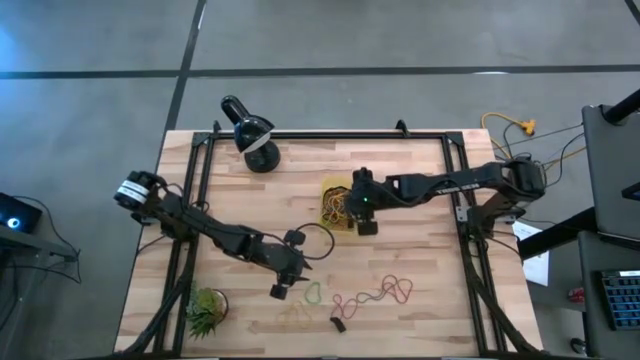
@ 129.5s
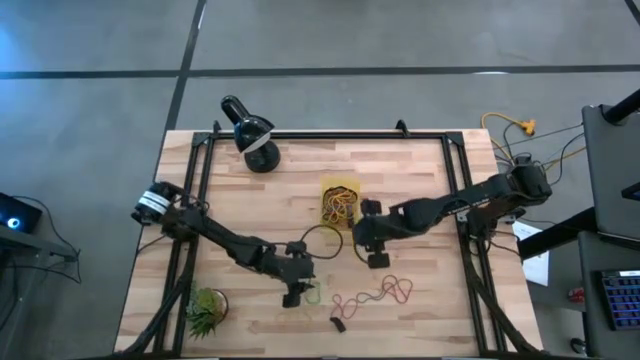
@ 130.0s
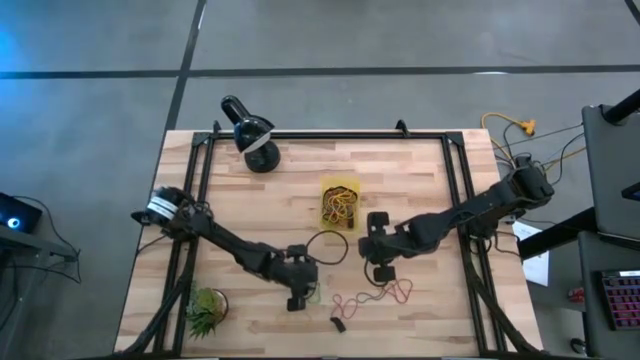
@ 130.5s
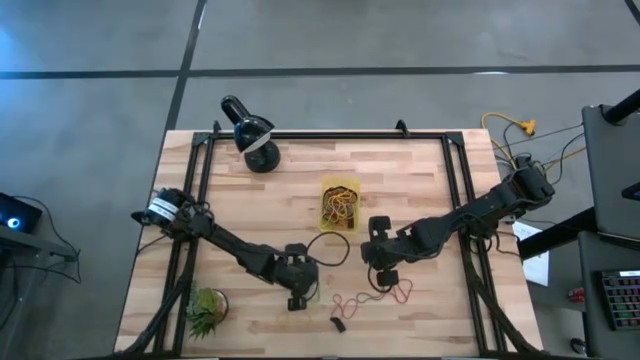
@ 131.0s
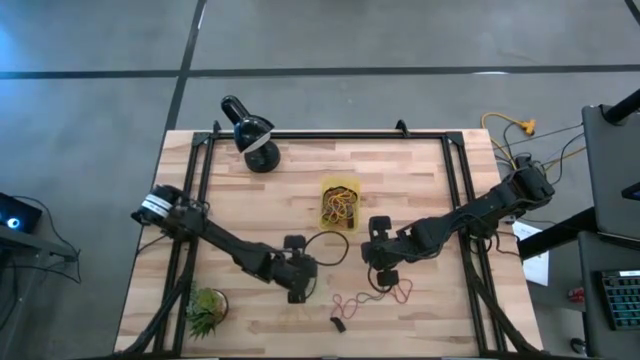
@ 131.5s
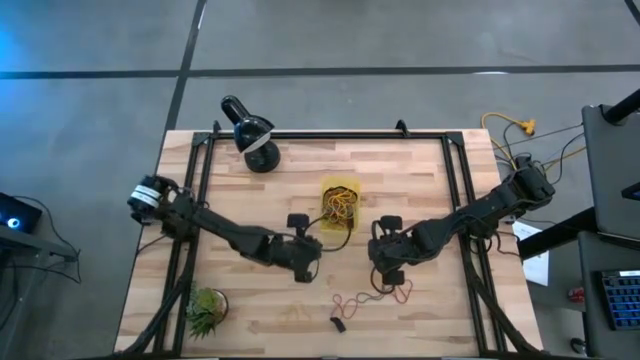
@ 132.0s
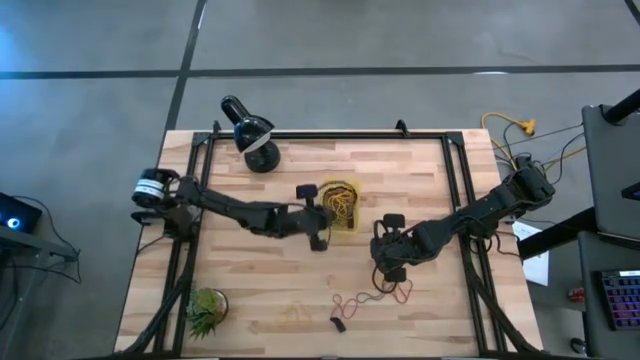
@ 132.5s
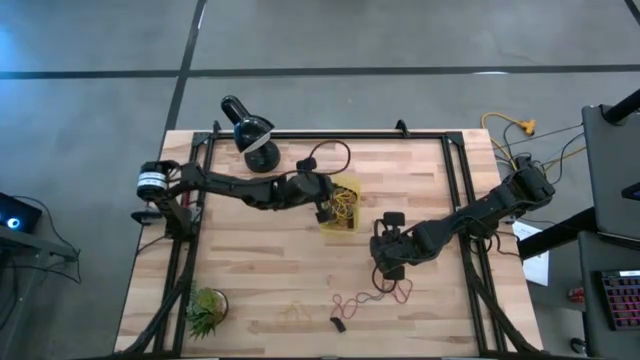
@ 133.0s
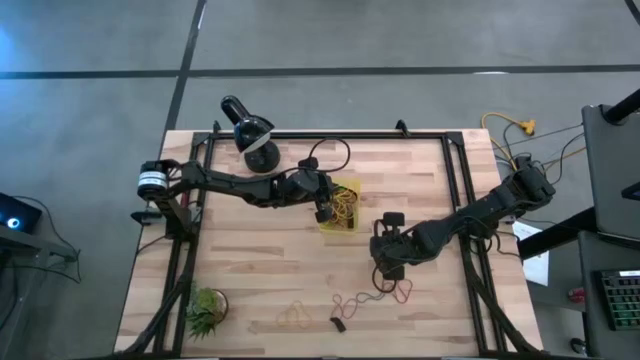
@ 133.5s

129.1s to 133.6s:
Task: Pick and place rubber bands into bin
Put the green rubber band into the yellow bin

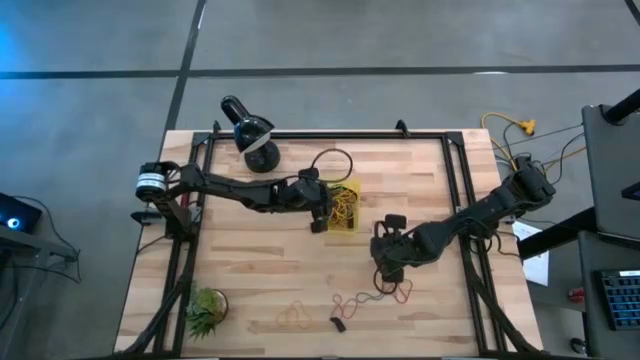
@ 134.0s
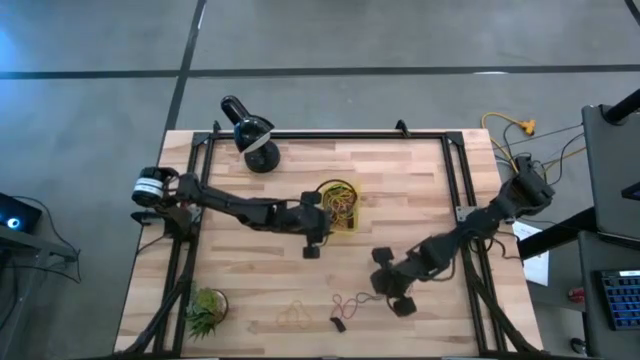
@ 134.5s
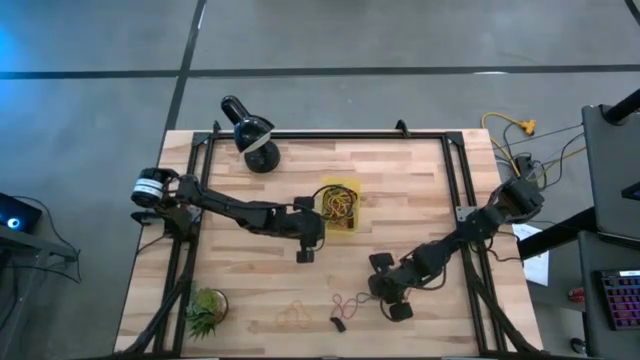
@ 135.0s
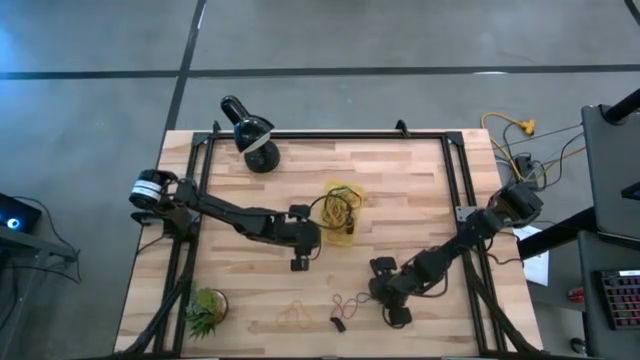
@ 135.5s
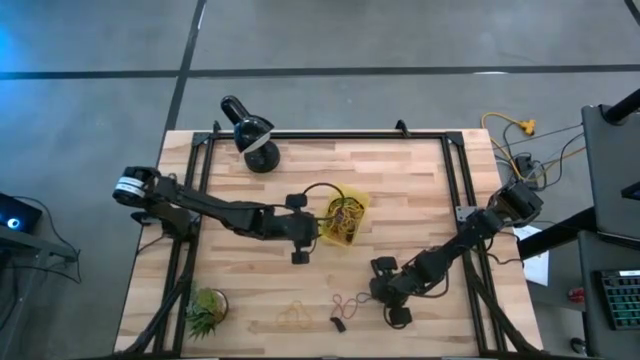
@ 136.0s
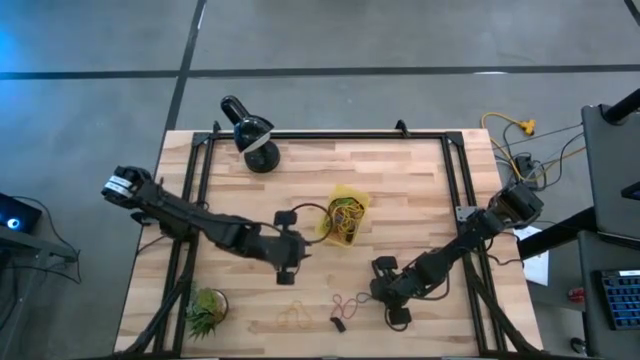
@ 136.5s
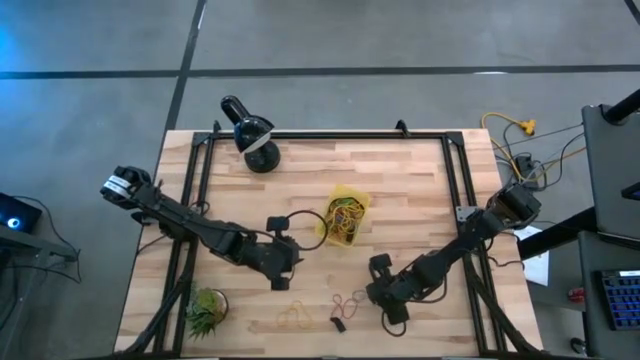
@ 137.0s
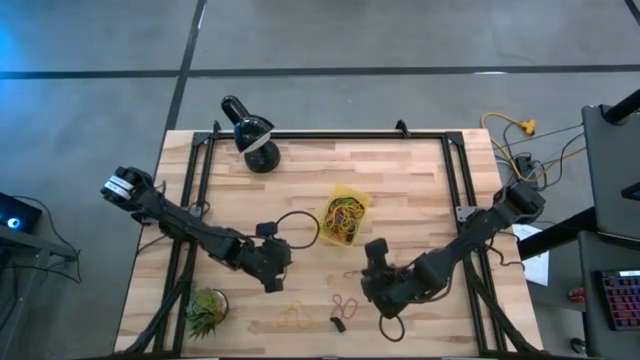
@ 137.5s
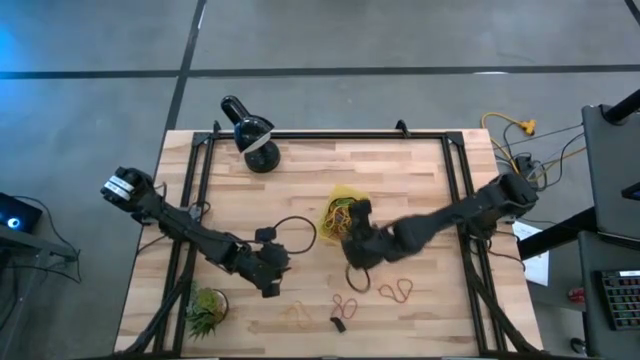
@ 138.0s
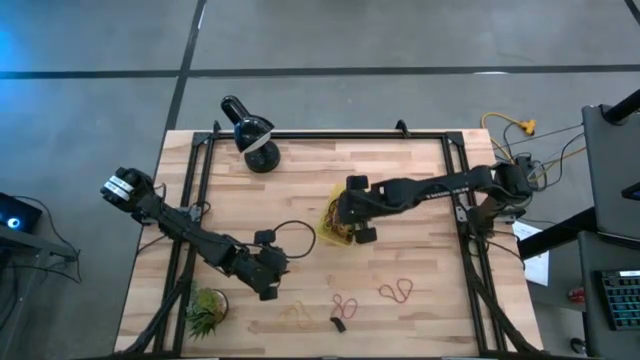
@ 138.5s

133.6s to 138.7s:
Put the blue rubber band into the yellow bin

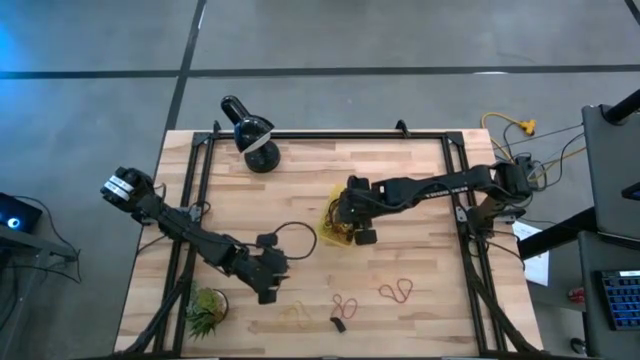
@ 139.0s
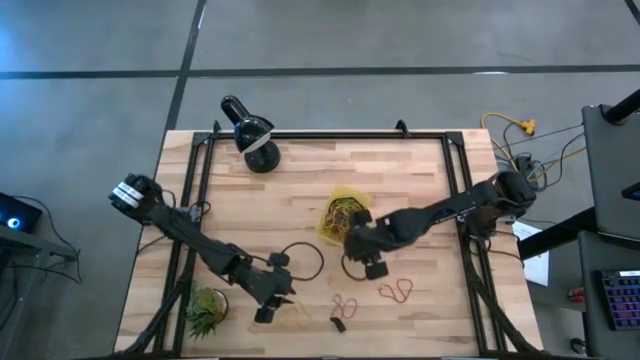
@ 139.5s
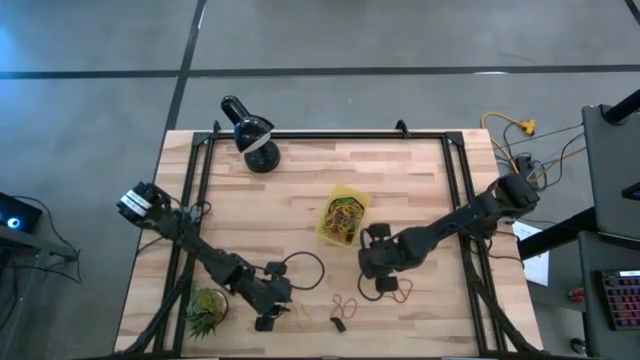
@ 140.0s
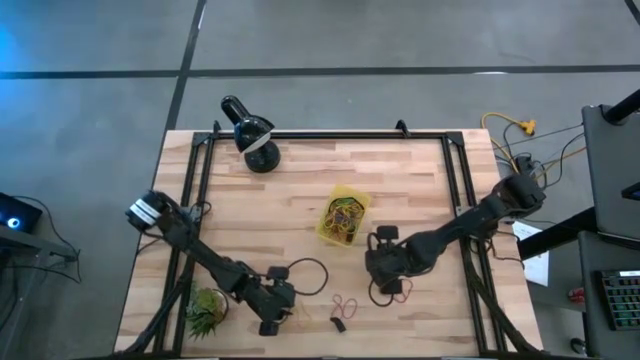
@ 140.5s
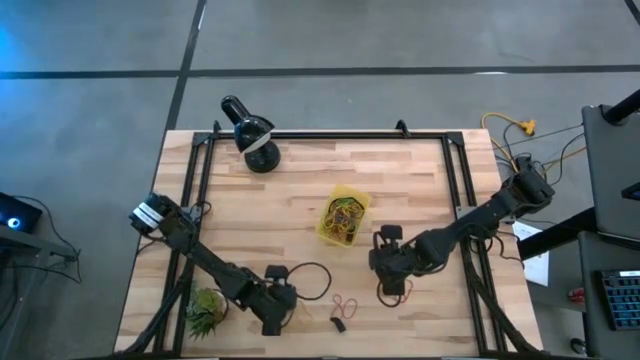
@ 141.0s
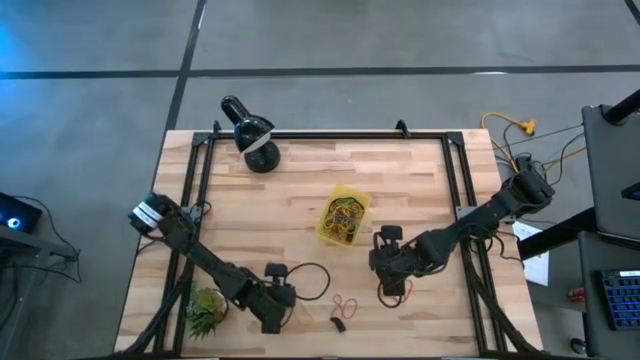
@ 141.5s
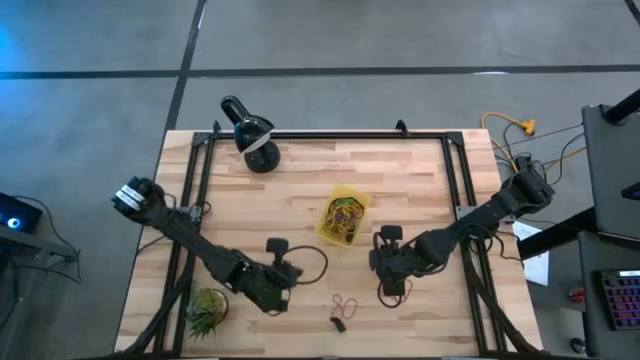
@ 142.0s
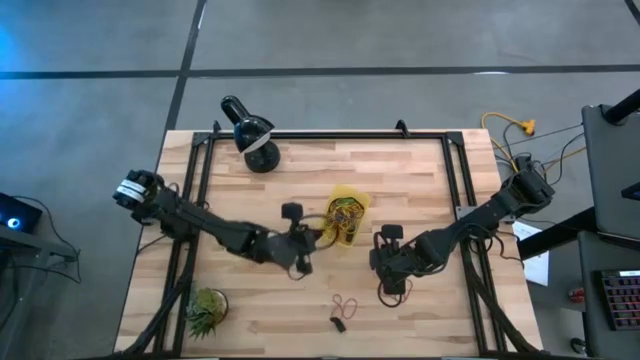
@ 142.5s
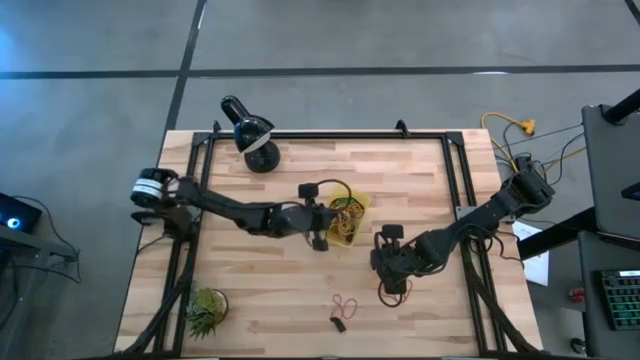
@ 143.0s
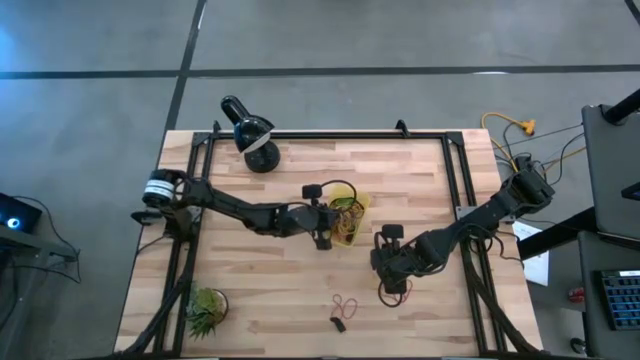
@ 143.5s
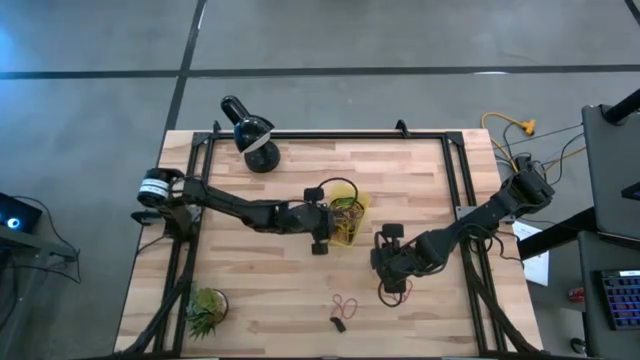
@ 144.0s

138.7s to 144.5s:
Put the yellow rubber band into the yellow bin

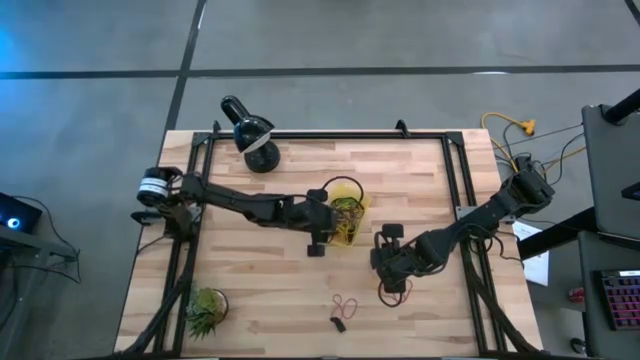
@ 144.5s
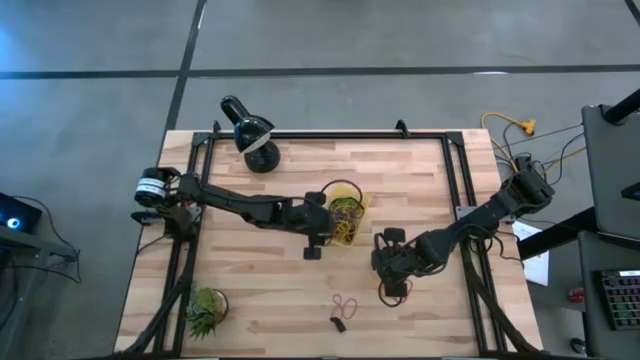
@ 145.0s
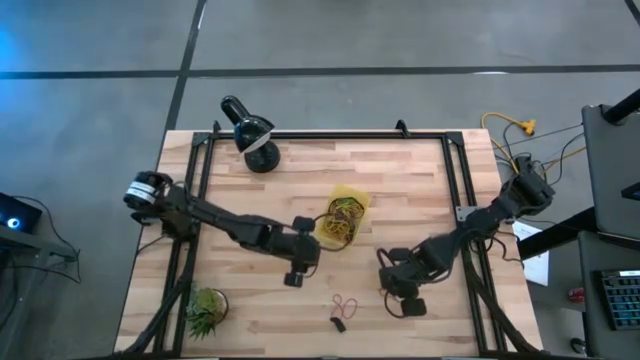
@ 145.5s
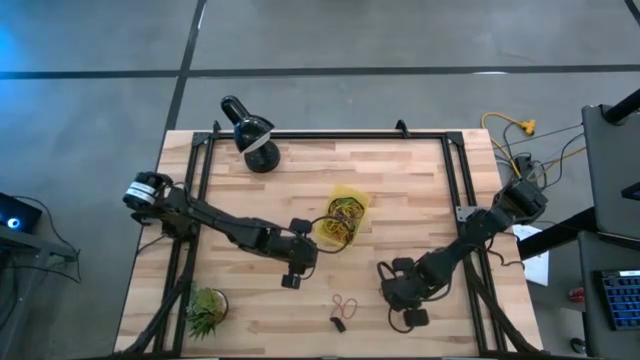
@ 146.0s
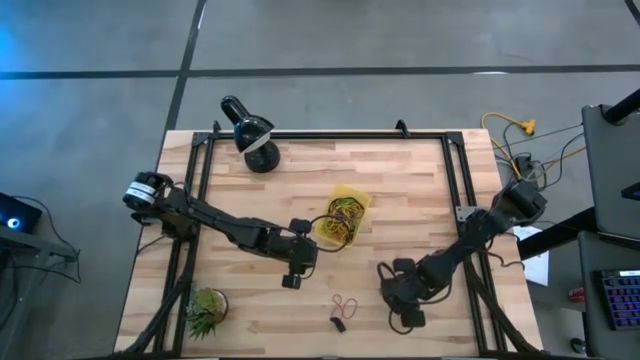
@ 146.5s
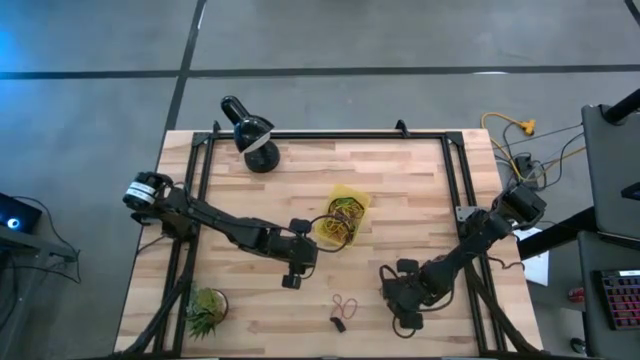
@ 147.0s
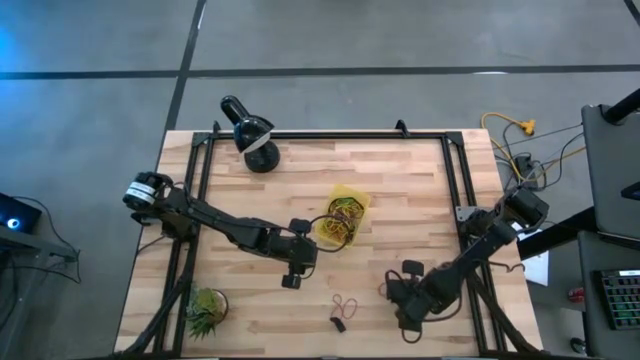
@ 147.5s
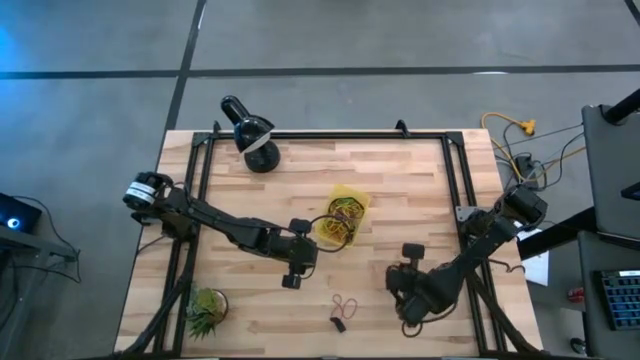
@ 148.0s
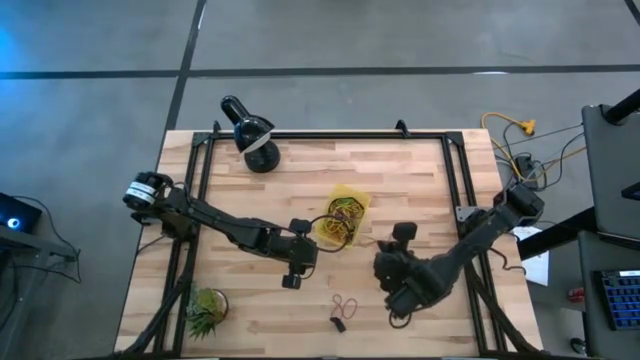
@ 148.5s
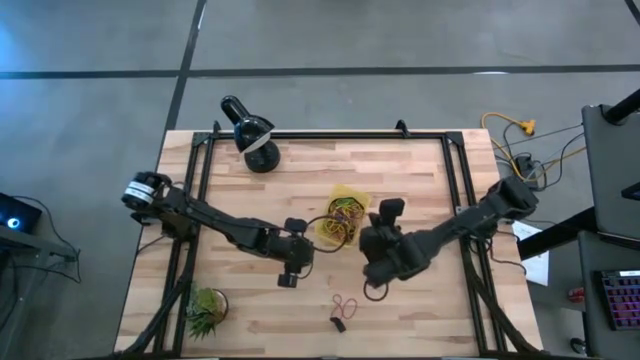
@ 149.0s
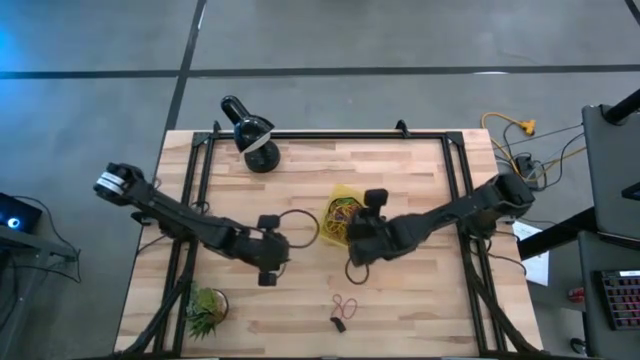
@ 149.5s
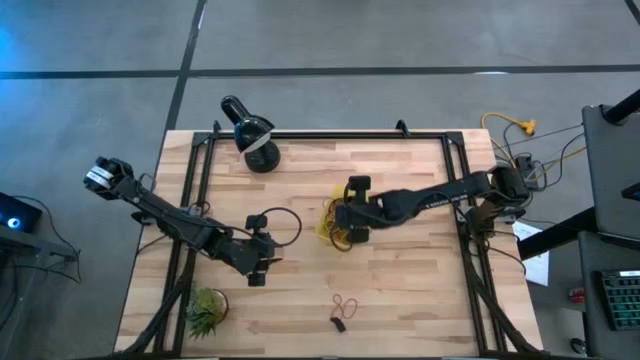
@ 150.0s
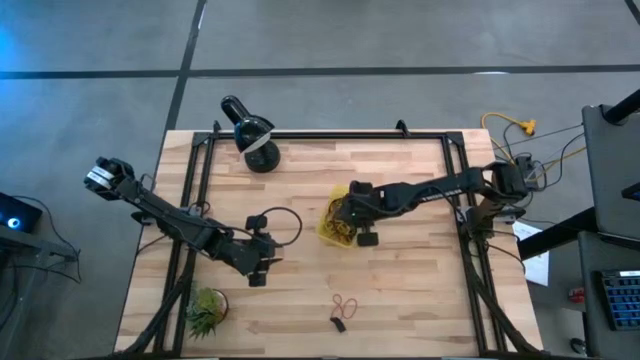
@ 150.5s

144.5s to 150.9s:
Put the red rubber band into the yellow bin

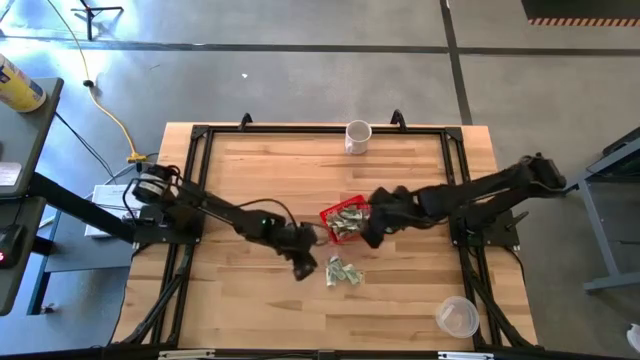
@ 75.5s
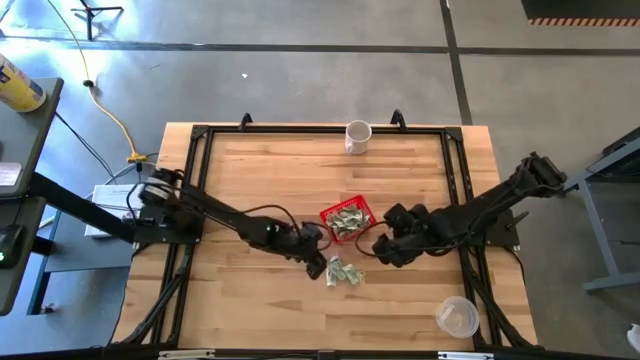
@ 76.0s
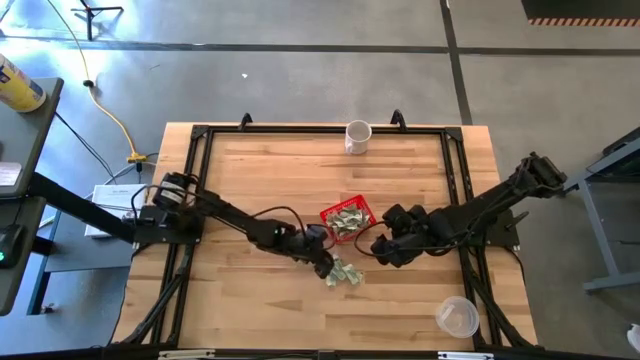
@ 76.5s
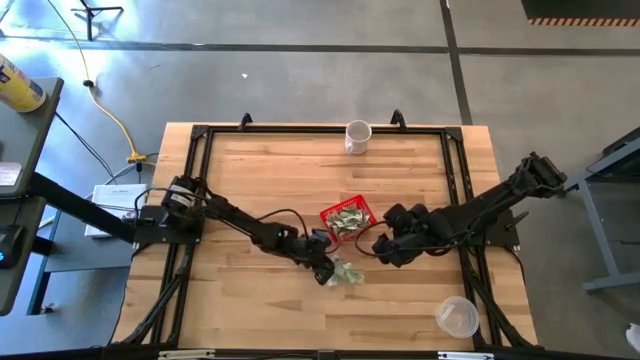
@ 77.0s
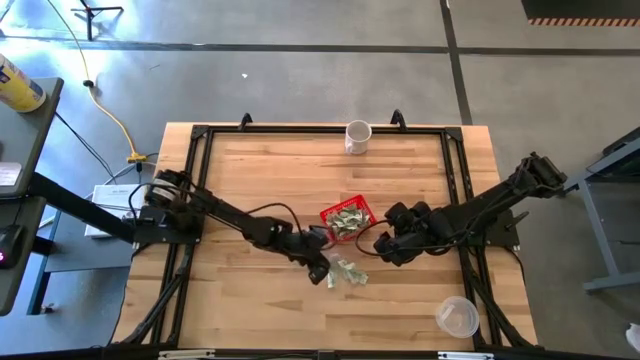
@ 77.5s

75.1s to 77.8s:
Task: Pick and place items into bin
Put the white stevia packet into the red bin
